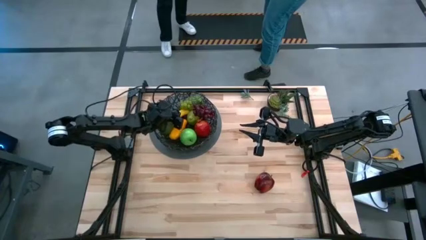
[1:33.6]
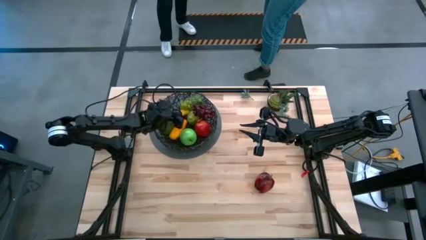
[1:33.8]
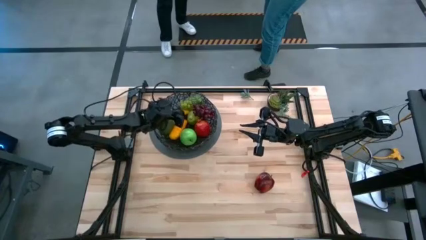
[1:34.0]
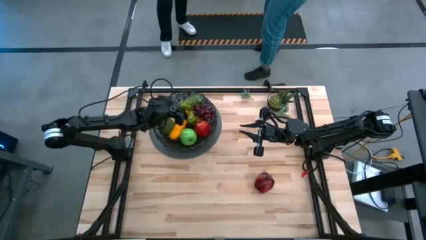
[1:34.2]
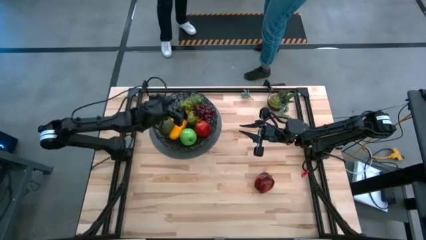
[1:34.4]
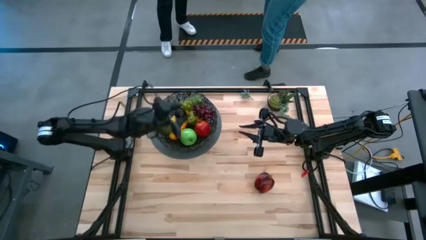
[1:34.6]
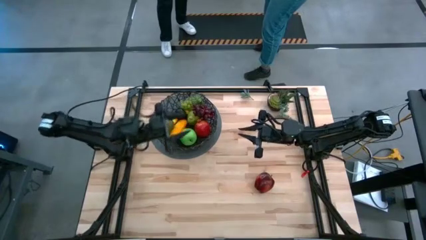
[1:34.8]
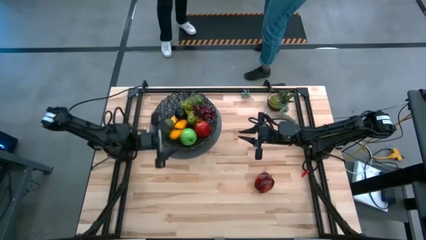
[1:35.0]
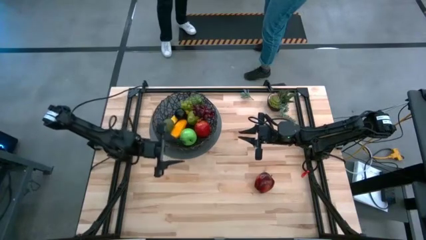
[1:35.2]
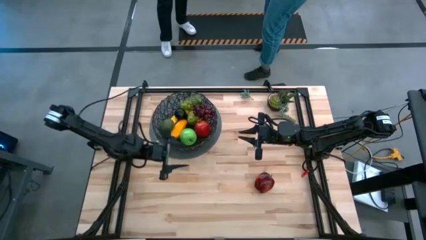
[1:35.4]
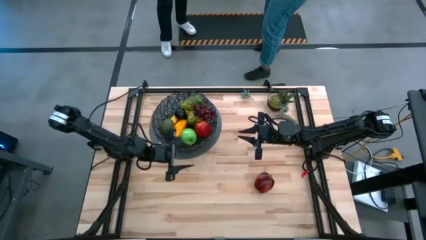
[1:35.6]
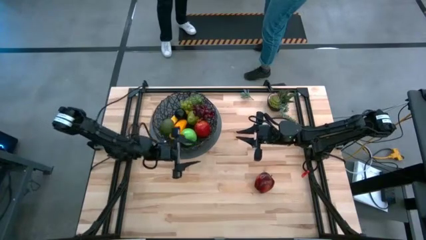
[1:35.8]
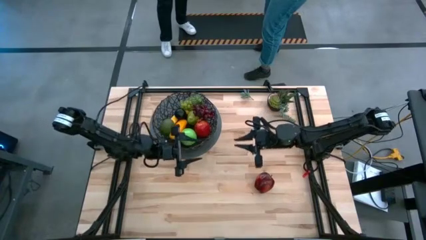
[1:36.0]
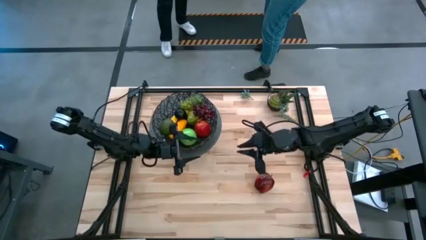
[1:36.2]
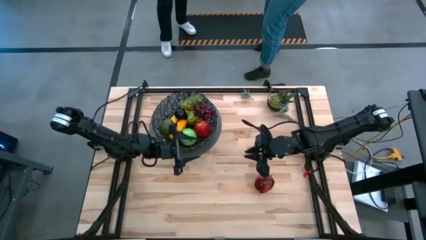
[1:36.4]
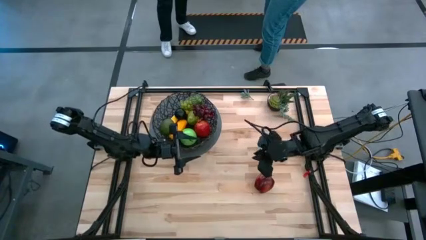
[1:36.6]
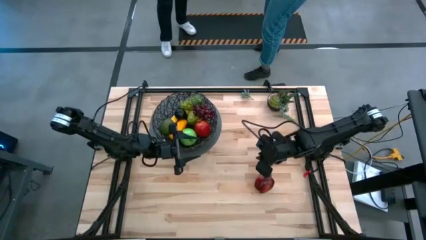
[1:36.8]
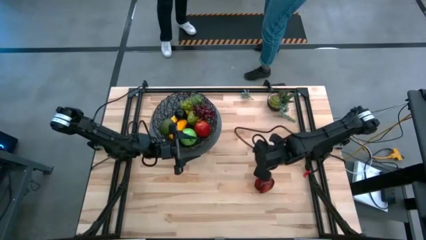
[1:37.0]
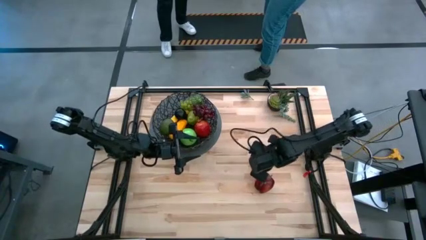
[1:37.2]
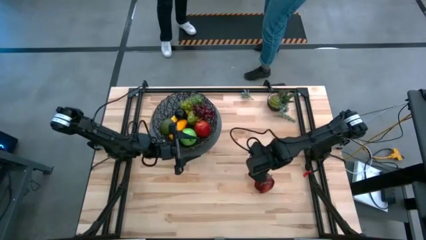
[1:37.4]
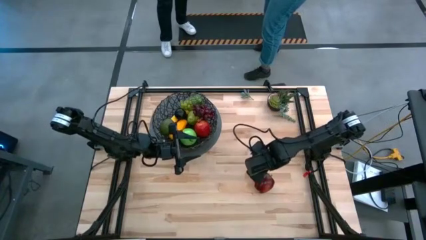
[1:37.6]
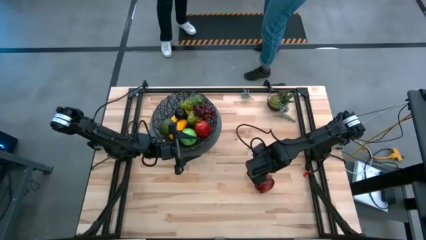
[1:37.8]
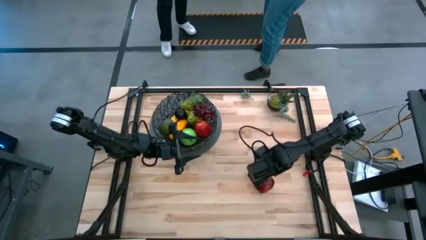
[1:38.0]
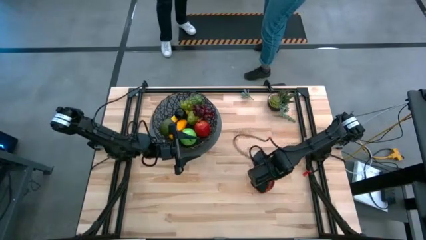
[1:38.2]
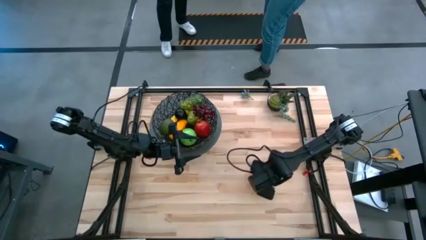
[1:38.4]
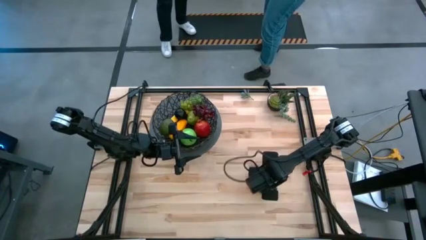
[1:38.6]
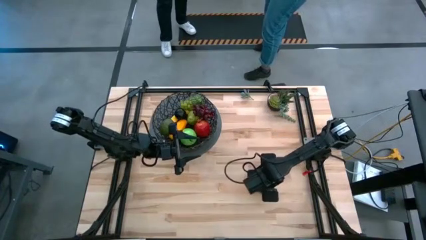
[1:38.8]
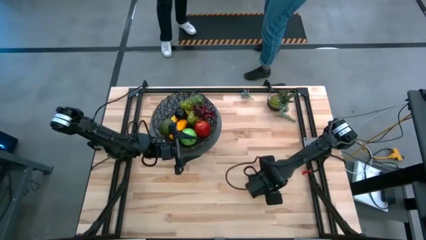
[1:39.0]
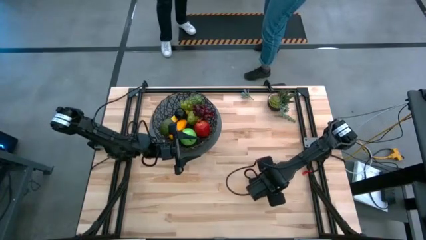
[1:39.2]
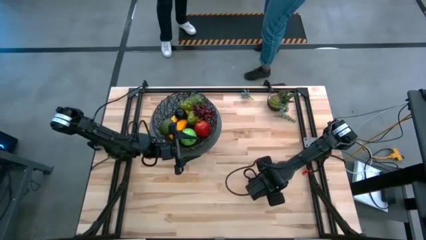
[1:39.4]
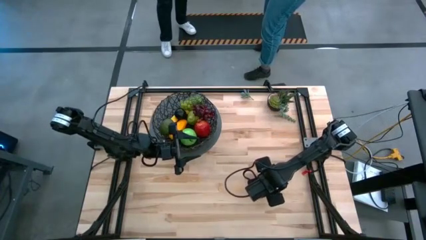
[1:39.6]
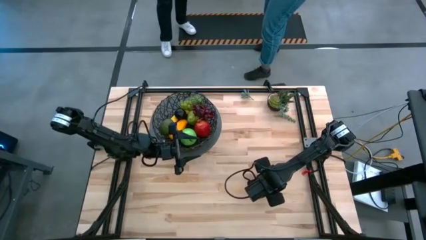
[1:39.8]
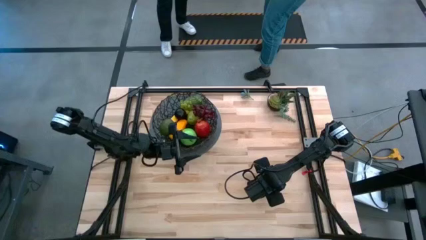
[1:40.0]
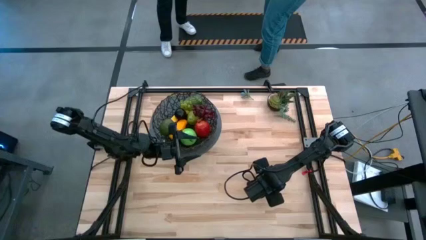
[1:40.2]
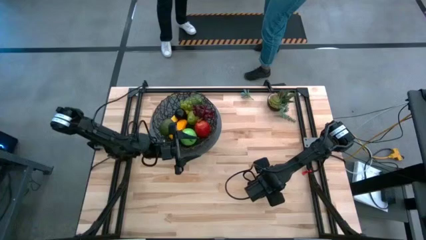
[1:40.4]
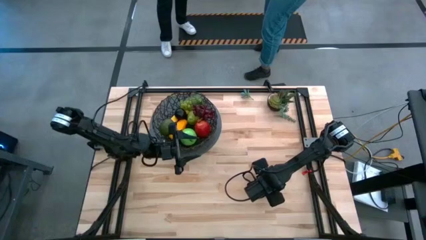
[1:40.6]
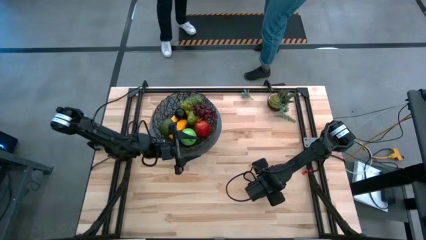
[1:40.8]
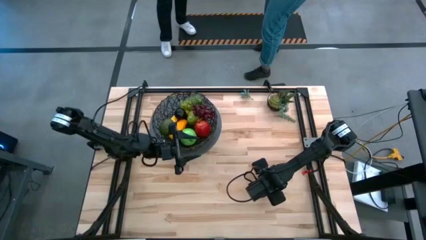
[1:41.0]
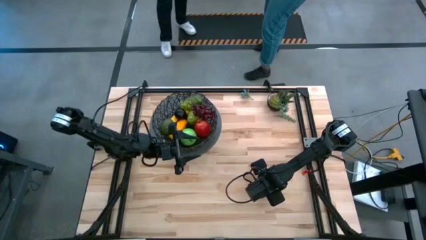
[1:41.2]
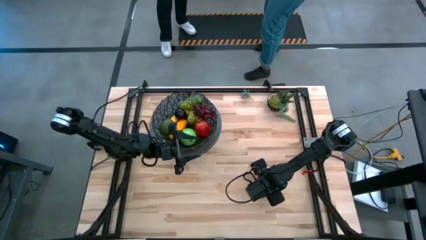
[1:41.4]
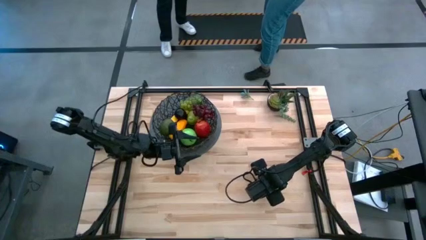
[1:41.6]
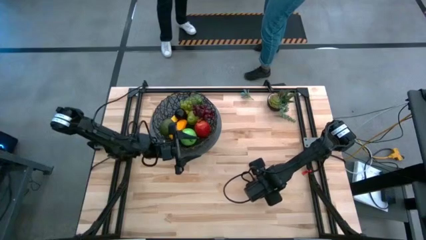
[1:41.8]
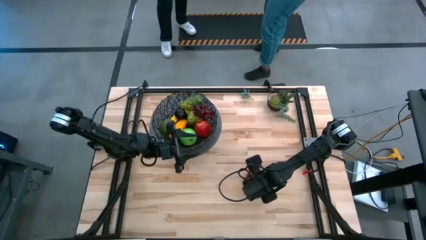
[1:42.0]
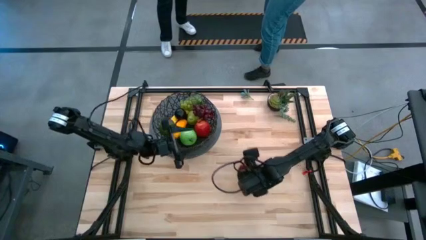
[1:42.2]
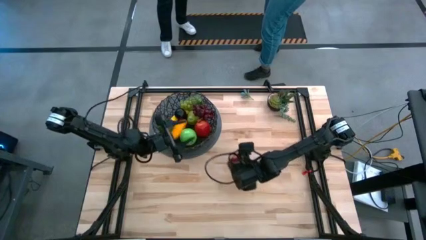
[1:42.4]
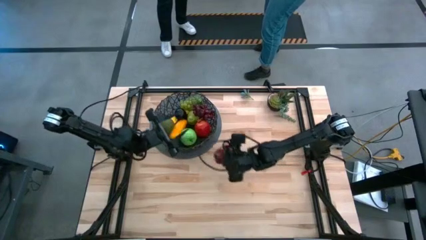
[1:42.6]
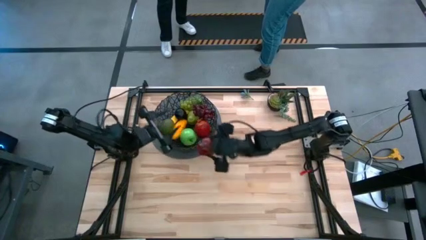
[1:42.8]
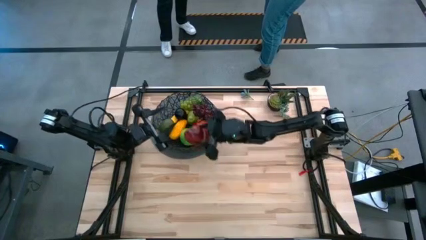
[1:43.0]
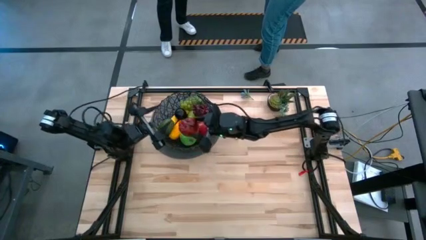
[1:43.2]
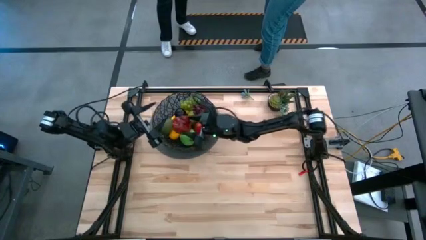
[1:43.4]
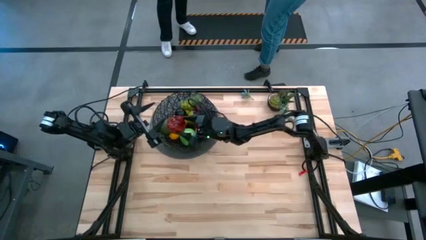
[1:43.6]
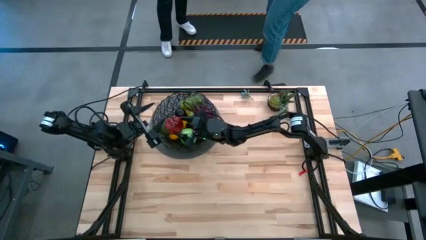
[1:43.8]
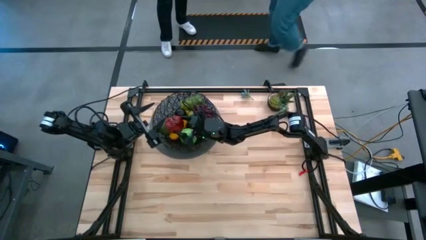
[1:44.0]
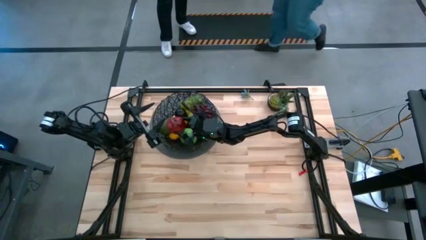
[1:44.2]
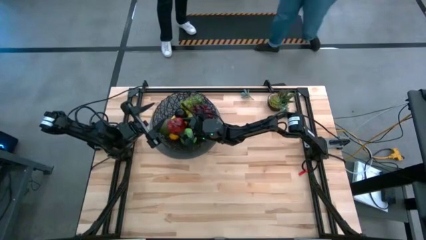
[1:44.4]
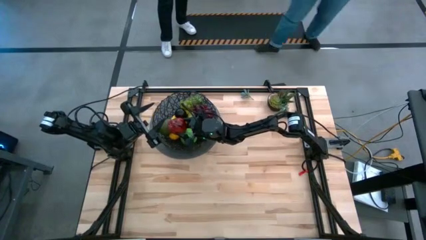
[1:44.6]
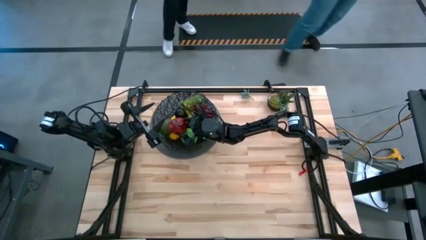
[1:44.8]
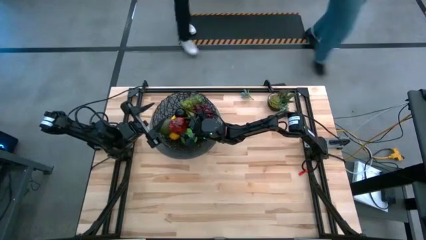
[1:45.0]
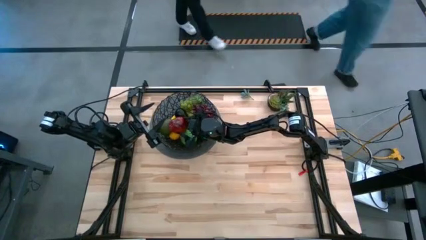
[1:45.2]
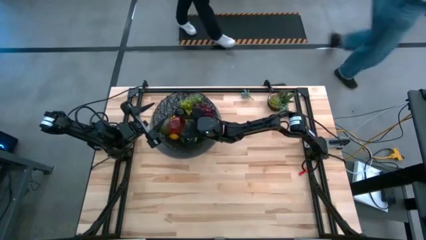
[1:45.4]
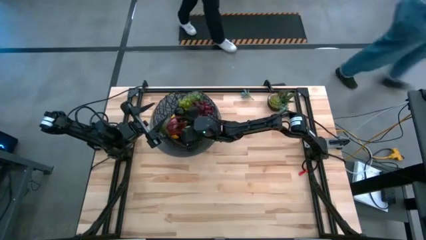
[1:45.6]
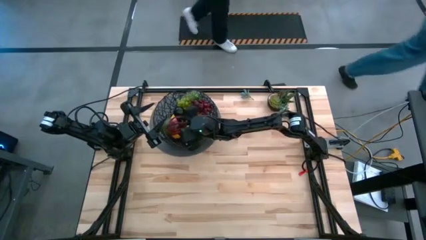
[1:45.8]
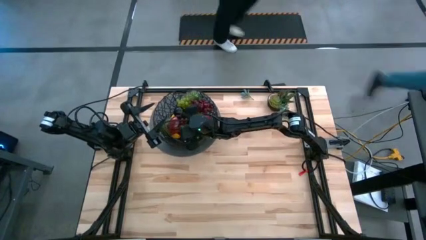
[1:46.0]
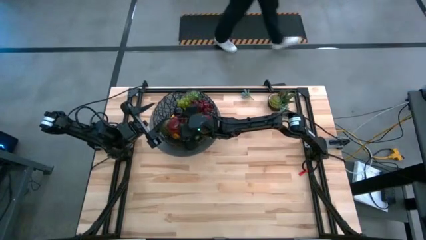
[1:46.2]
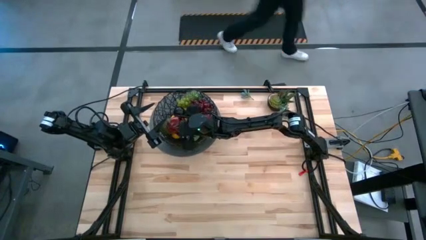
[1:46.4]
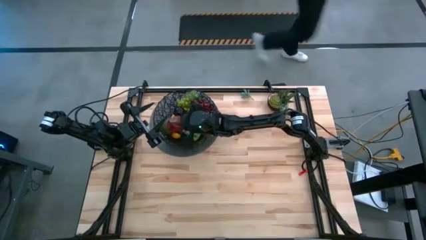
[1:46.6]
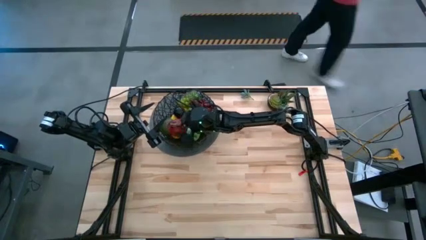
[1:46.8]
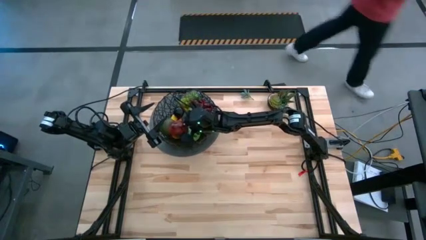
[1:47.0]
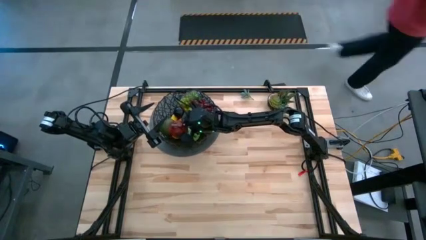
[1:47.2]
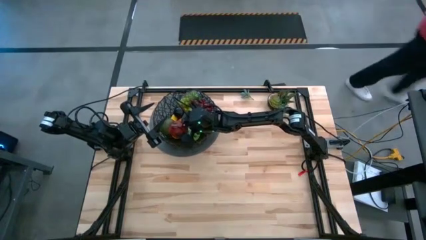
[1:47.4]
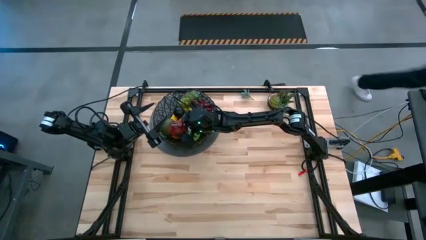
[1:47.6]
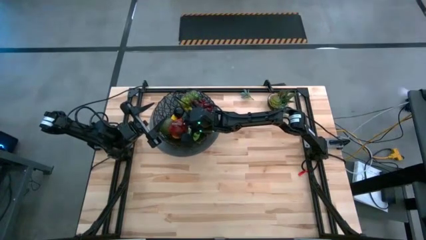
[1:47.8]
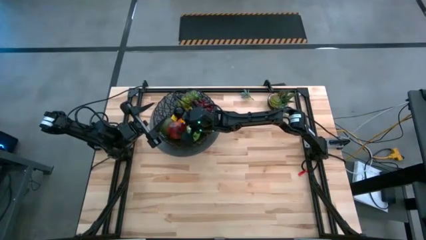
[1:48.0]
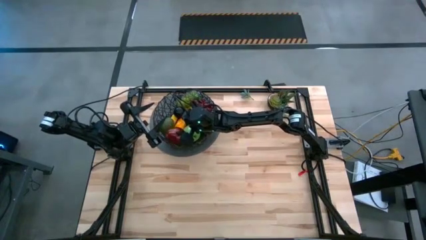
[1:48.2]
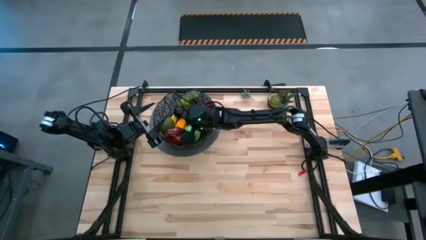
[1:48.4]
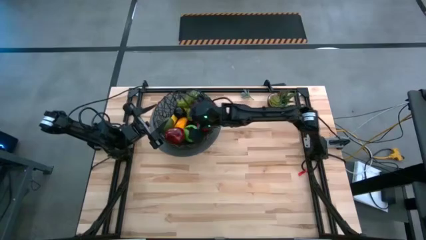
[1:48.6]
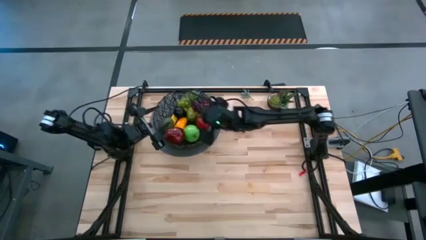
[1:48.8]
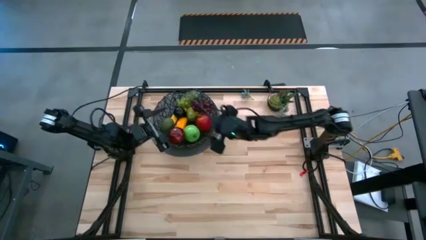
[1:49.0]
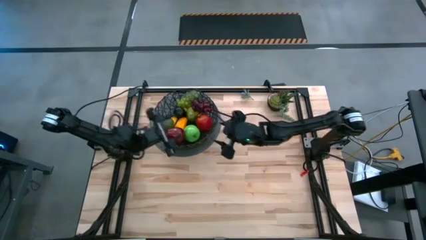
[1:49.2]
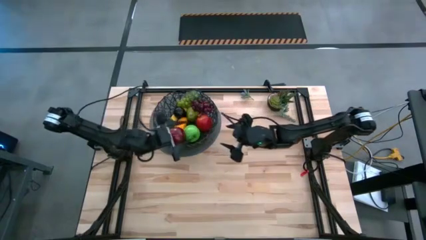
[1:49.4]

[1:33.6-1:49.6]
Task: Build produce basket
Put the red apple into the basket
